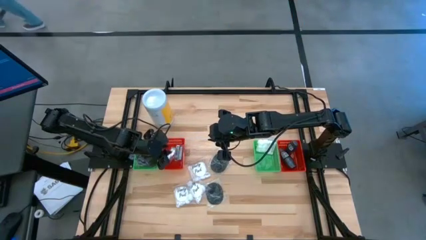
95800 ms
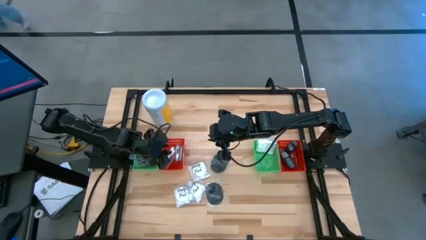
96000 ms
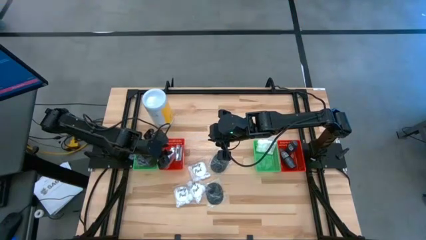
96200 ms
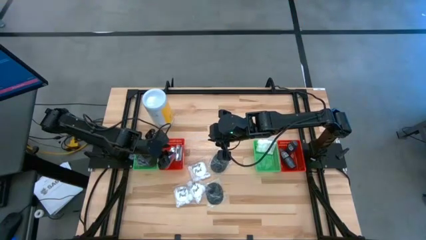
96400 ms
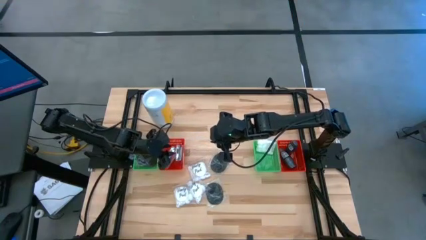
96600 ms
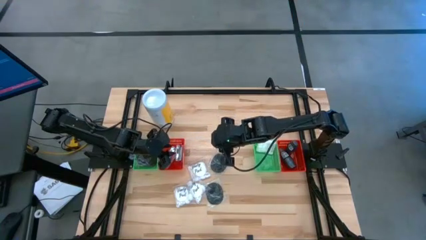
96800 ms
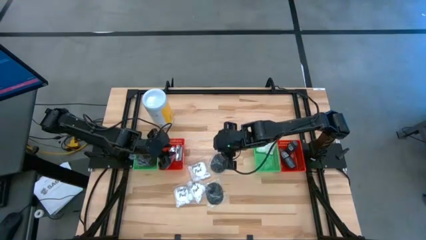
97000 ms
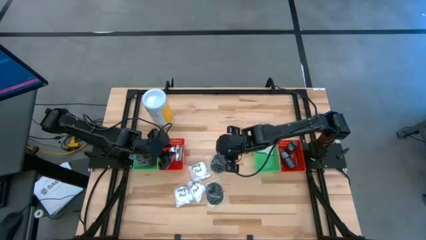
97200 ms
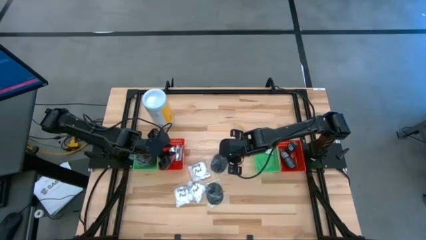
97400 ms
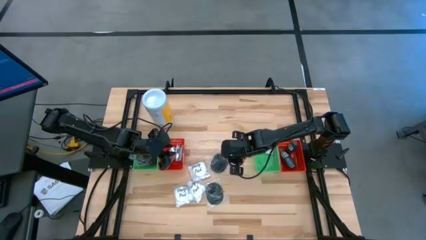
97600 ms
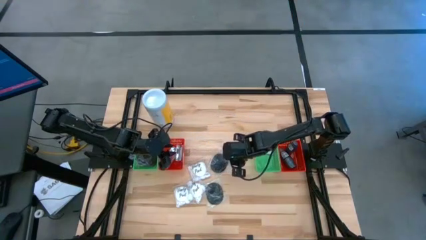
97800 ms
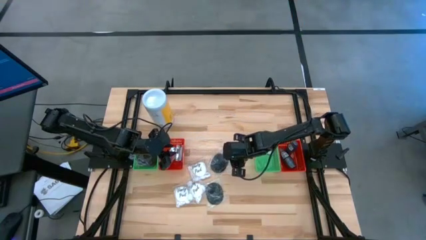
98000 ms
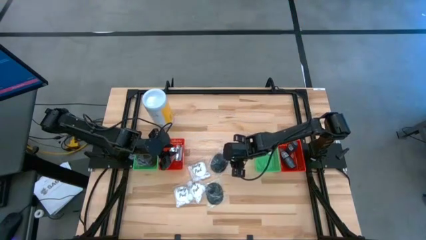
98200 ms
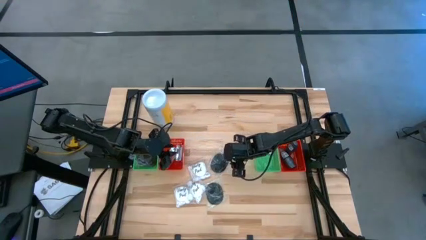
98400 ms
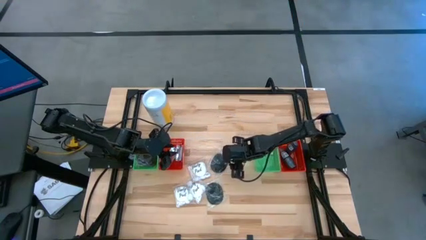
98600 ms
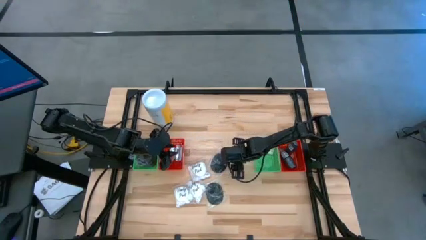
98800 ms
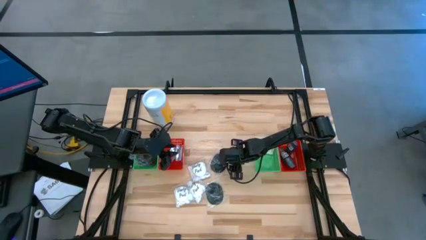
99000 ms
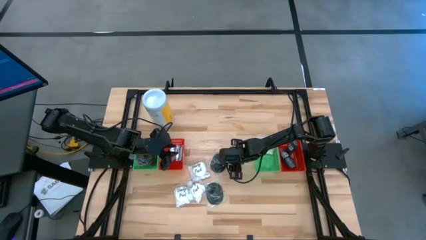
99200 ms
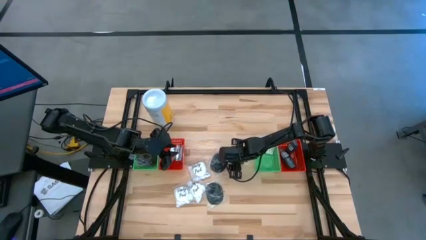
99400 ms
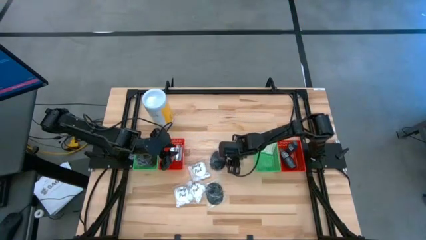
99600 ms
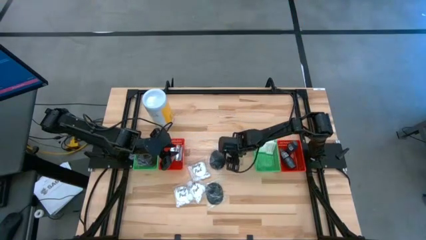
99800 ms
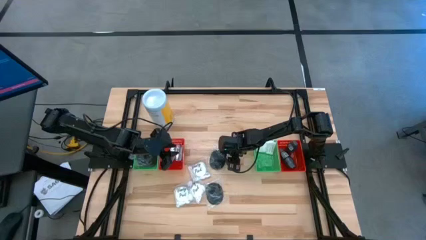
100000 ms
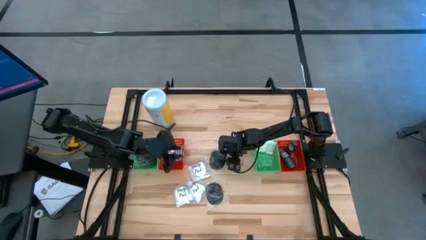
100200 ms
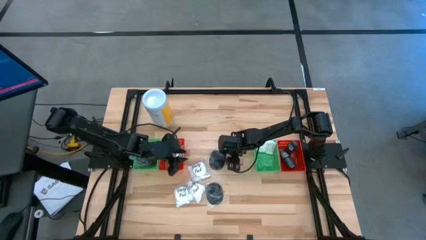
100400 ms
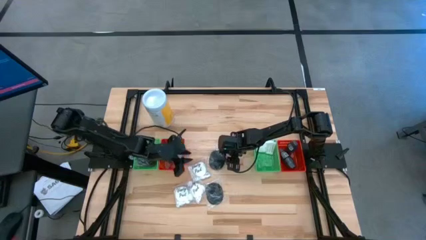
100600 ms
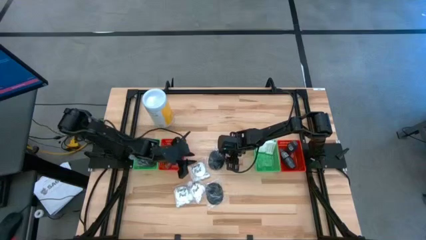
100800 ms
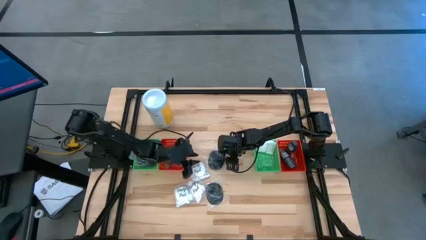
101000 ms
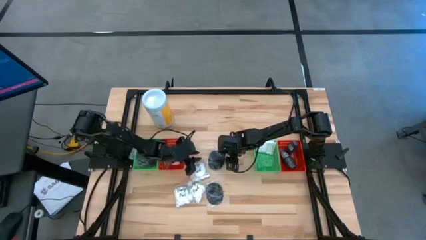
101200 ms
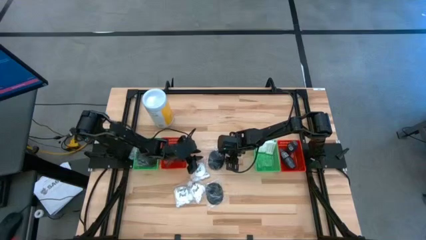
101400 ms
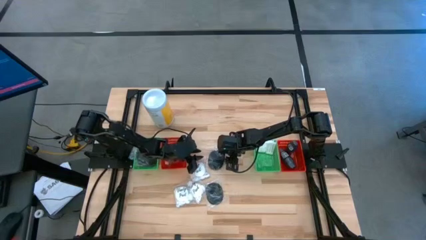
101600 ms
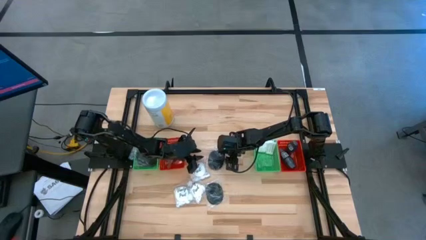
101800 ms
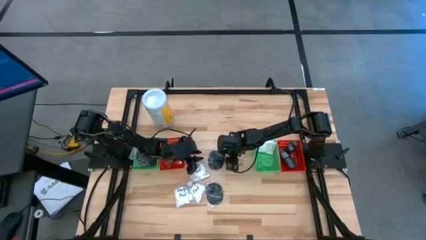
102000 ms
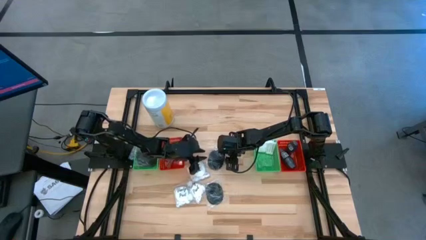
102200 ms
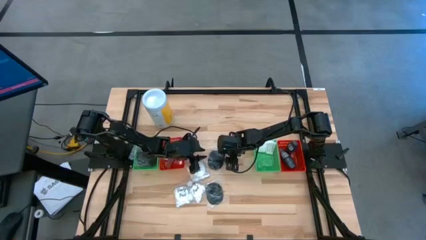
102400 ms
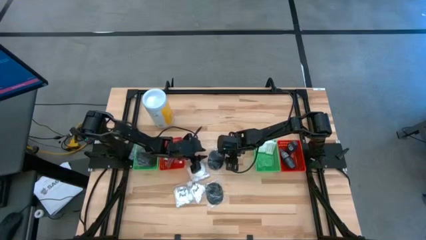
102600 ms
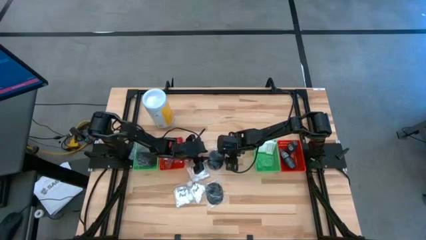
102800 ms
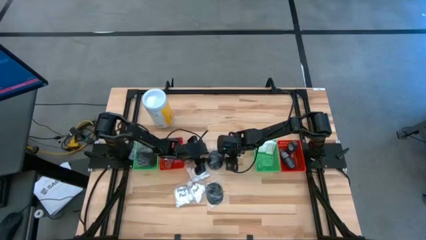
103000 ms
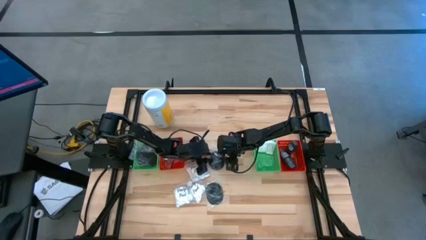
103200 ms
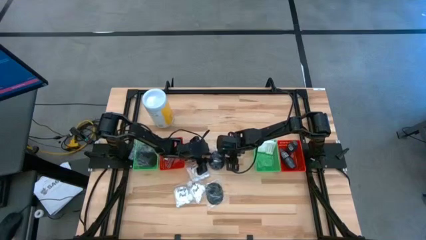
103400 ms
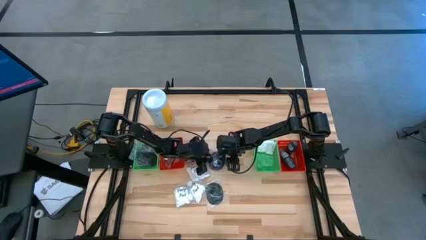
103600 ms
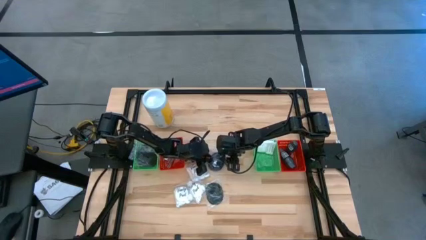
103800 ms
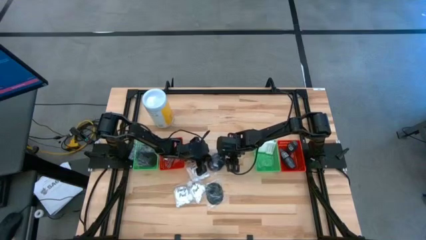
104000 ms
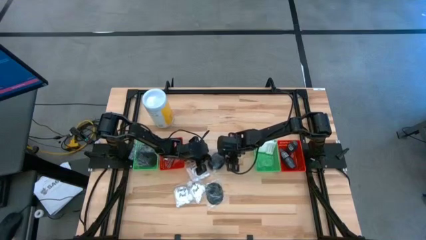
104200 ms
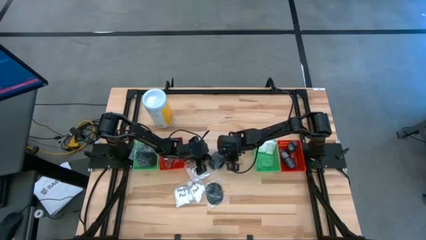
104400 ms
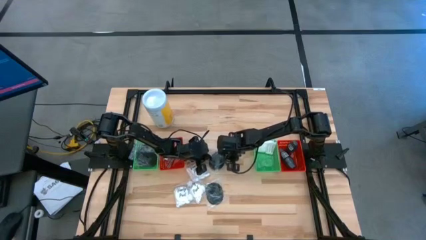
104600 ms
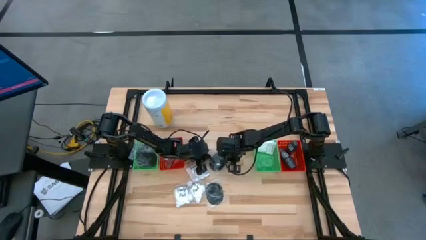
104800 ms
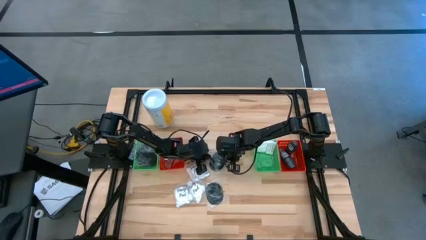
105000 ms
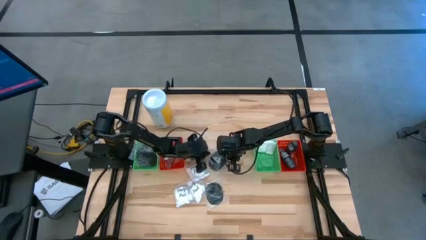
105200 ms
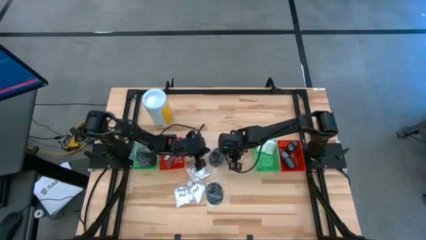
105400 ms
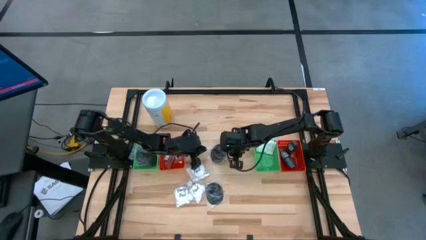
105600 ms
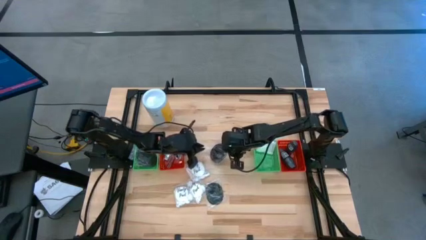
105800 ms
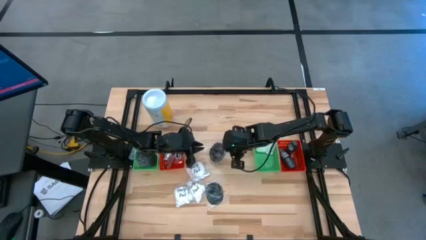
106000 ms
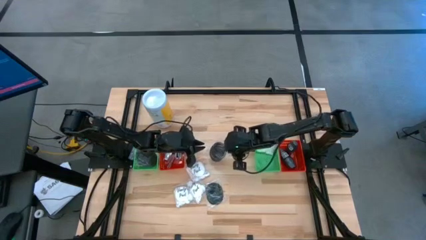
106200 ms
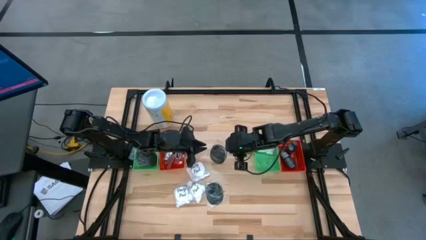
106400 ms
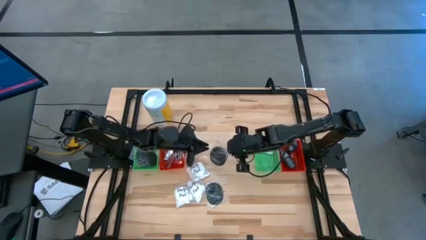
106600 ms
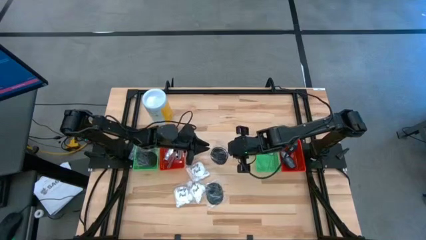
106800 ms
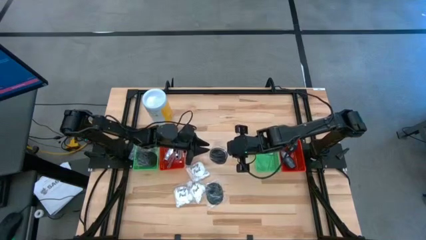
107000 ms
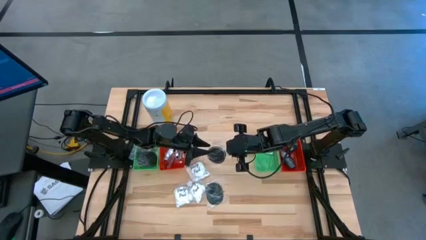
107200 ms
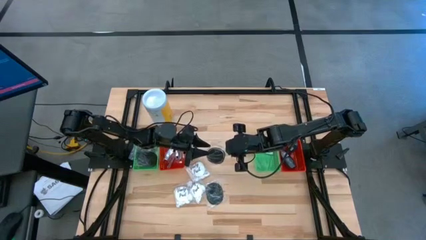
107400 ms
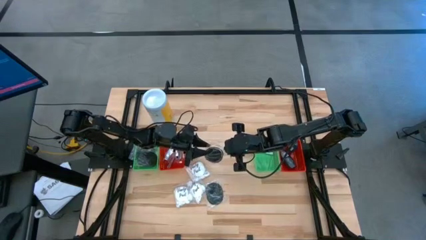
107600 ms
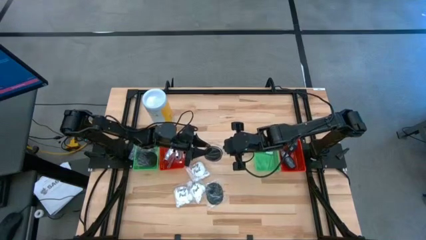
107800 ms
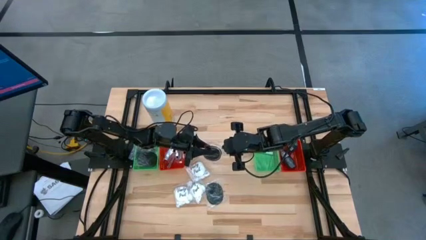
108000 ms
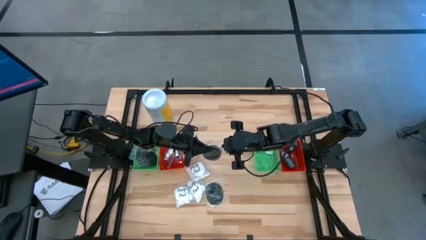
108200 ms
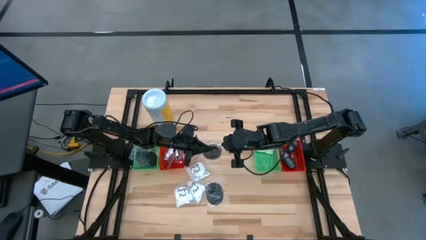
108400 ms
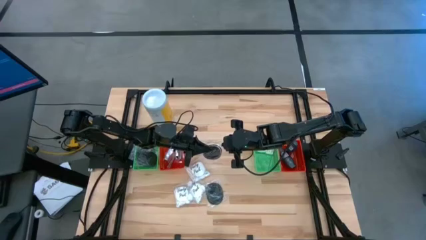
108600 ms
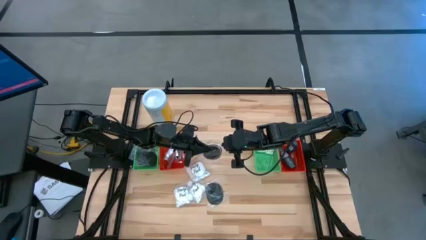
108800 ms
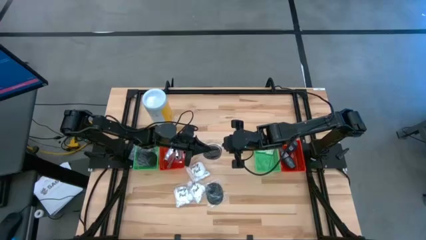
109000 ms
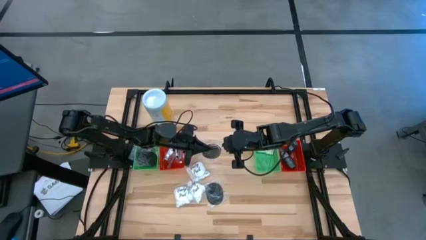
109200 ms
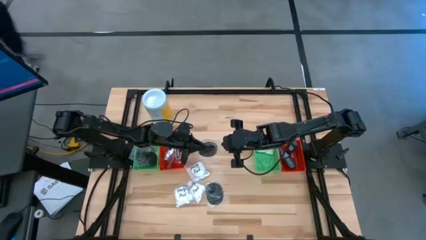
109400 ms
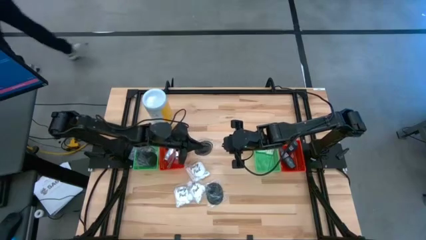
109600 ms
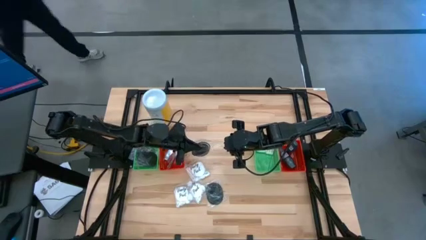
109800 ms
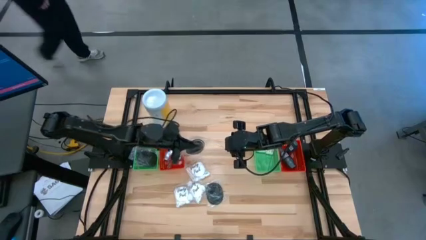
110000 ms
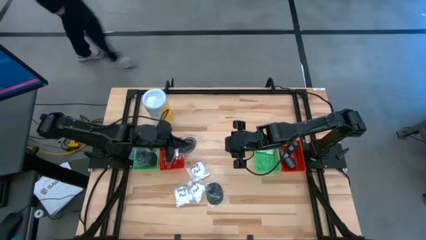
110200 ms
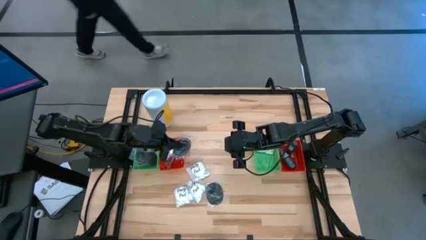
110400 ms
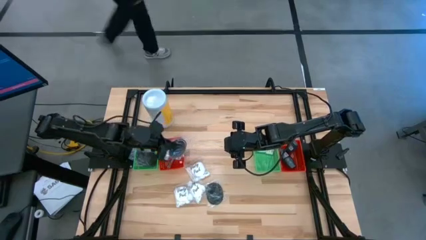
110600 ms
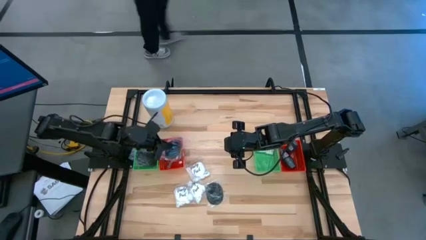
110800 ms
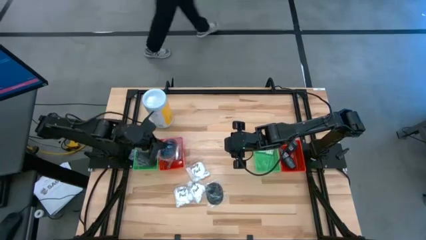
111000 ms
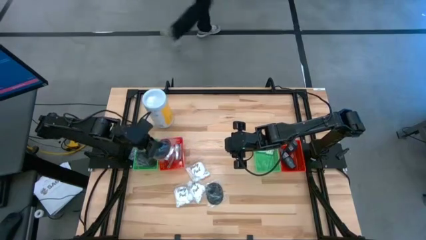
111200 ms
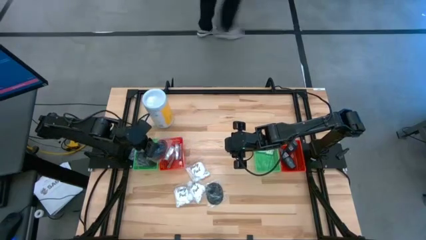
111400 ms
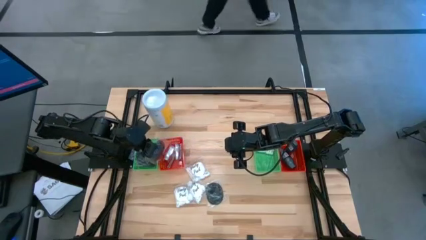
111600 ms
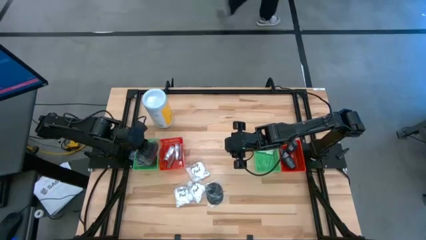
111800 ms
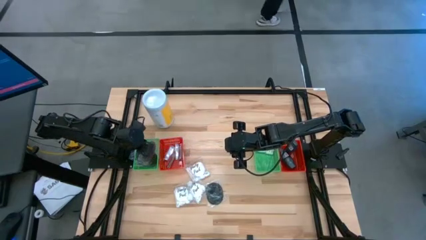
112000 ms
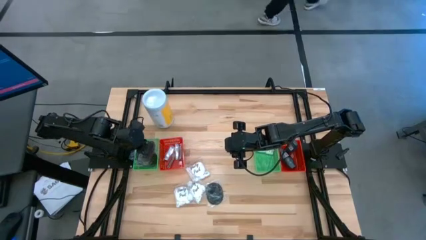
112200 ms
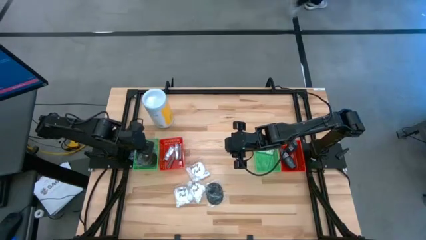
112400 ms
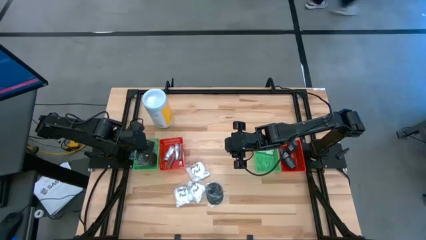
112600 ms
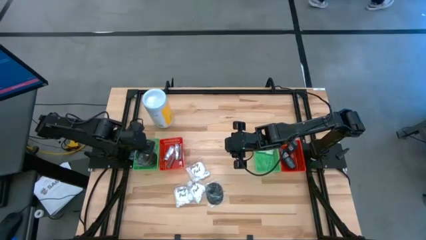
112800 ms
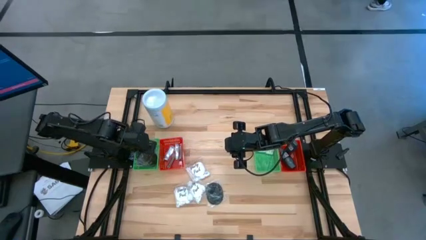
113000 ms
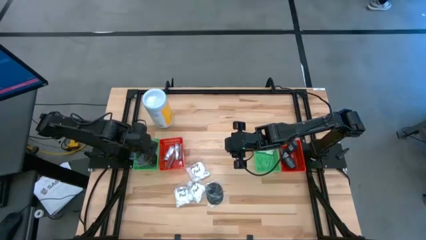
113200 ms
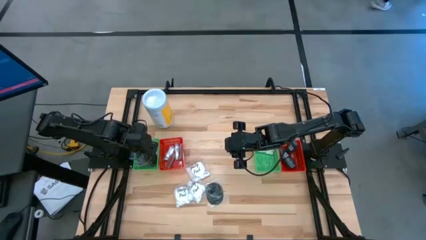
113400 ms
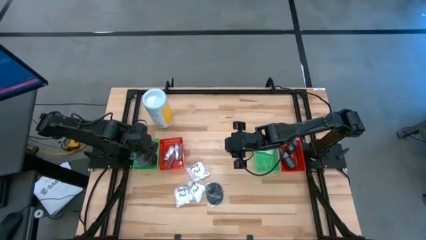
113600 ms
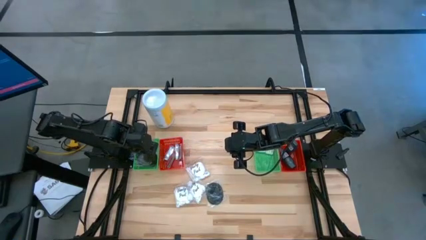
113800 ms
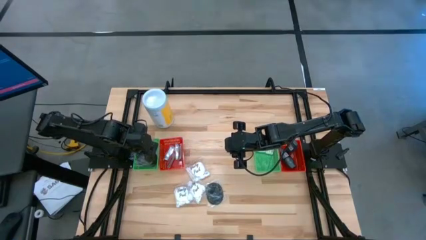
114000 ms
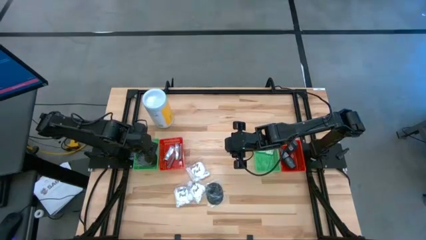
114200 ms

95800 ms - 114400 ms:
Task: Pick & Place Travel size toiletries
Put the black hair brush into the left green bin
